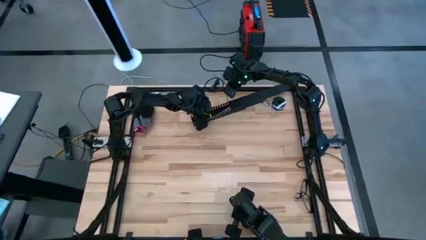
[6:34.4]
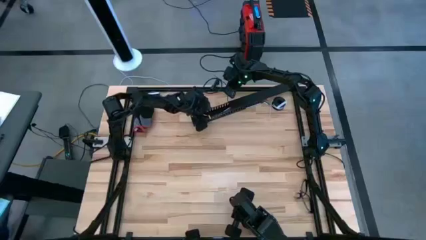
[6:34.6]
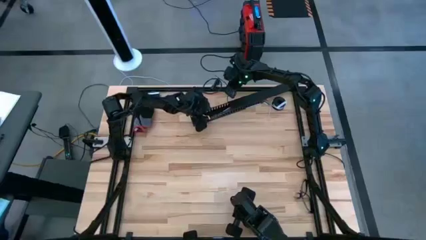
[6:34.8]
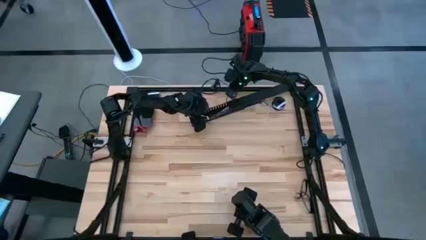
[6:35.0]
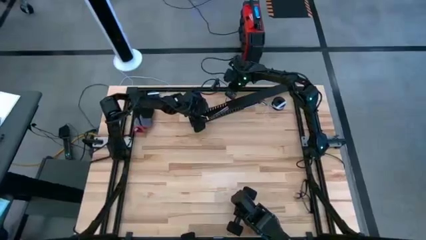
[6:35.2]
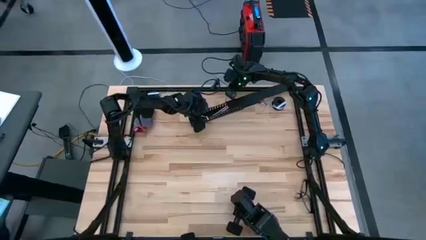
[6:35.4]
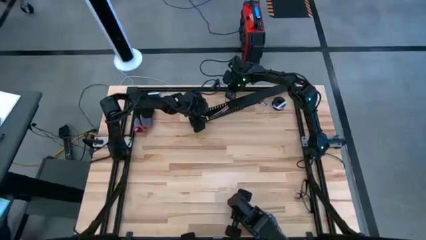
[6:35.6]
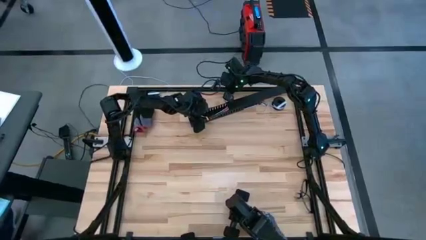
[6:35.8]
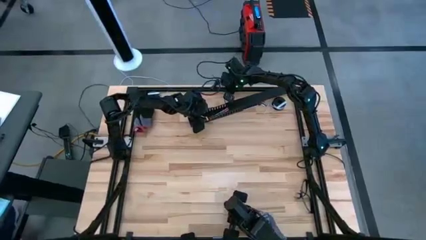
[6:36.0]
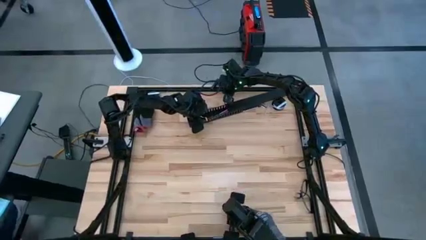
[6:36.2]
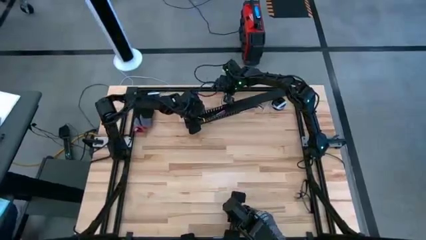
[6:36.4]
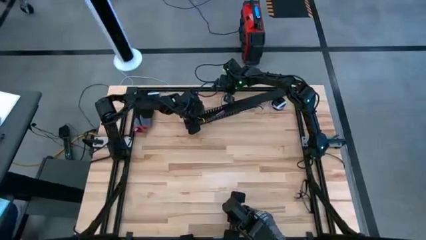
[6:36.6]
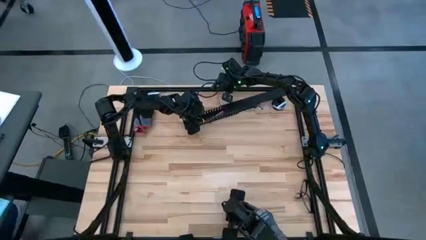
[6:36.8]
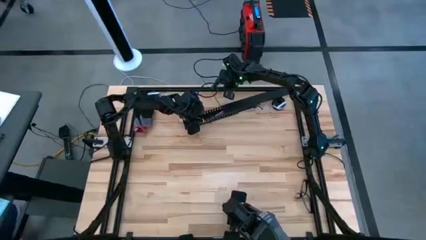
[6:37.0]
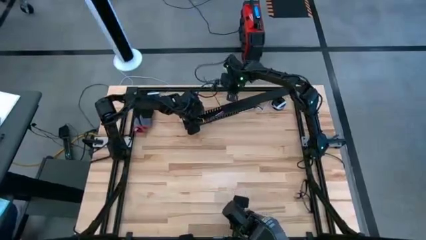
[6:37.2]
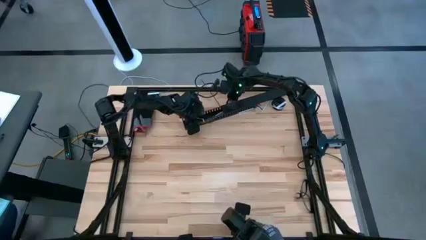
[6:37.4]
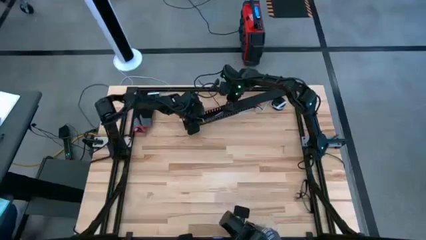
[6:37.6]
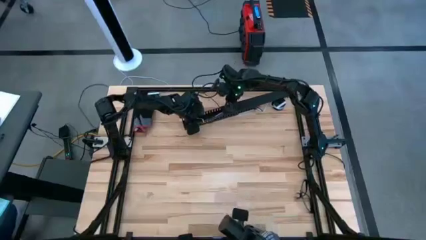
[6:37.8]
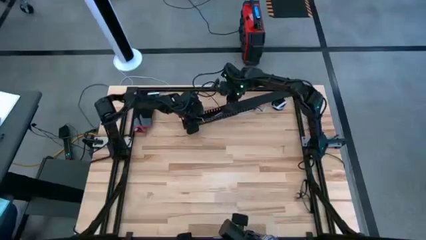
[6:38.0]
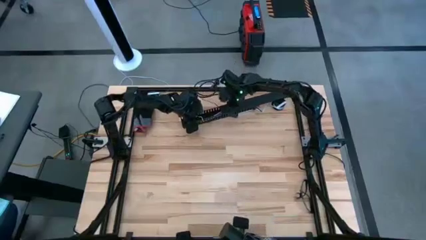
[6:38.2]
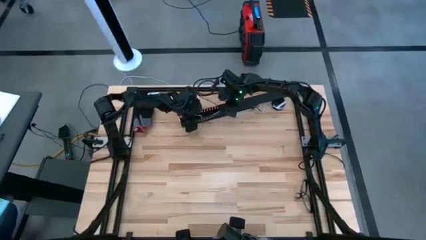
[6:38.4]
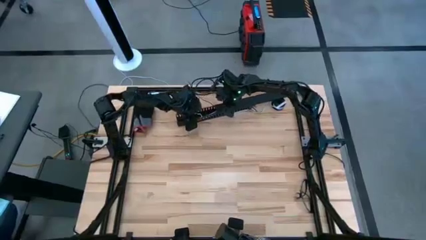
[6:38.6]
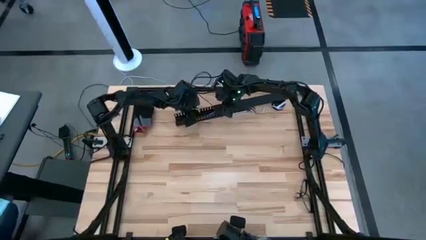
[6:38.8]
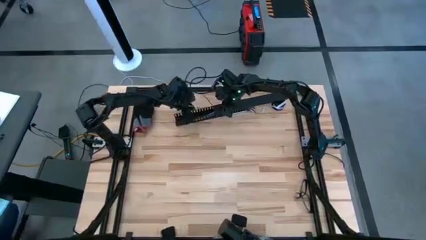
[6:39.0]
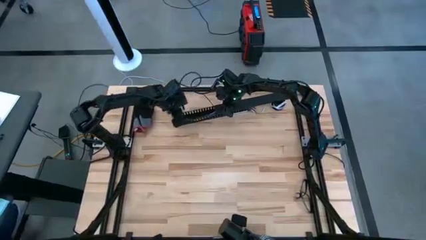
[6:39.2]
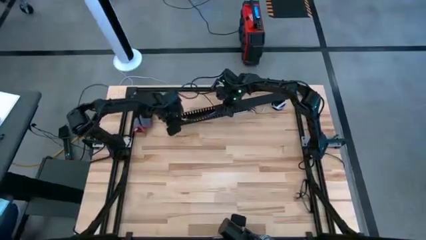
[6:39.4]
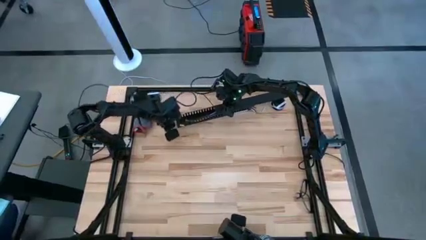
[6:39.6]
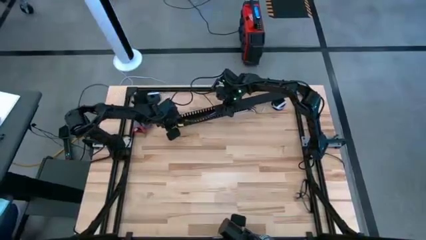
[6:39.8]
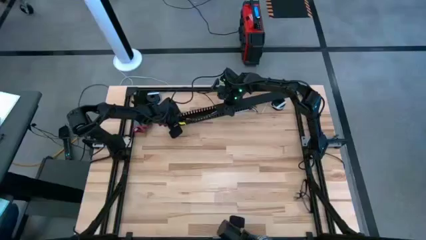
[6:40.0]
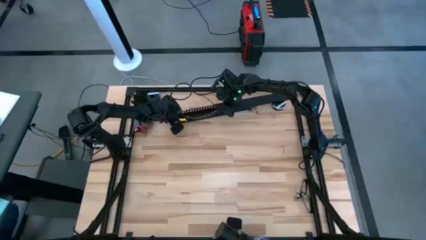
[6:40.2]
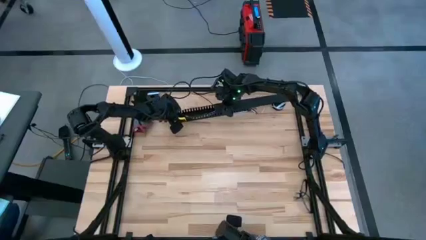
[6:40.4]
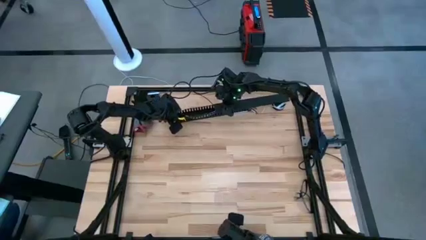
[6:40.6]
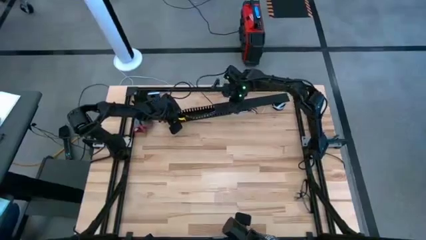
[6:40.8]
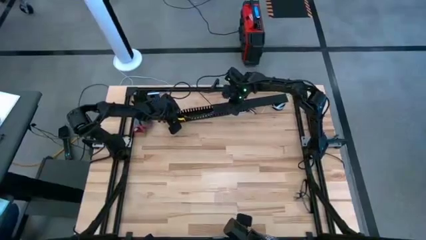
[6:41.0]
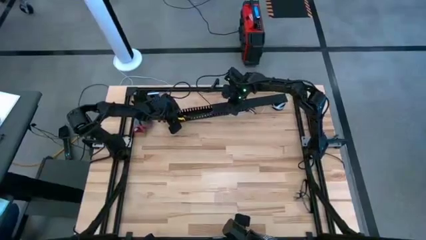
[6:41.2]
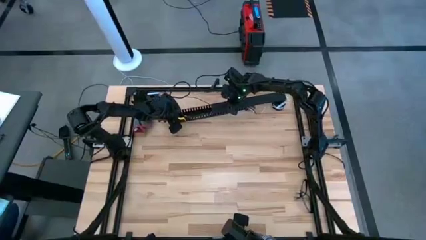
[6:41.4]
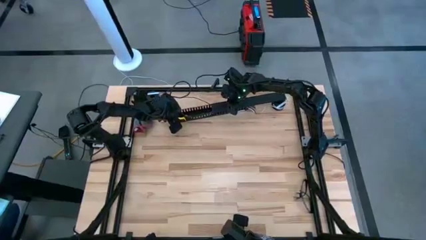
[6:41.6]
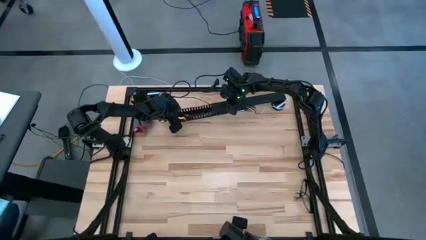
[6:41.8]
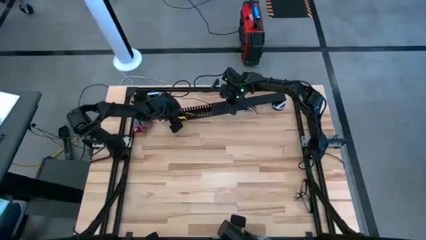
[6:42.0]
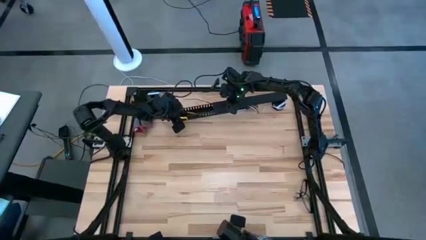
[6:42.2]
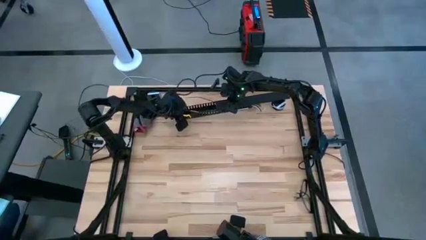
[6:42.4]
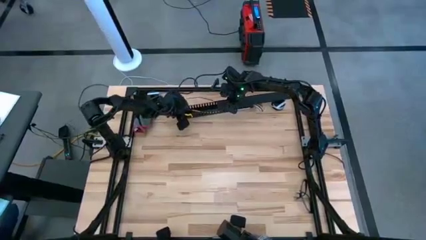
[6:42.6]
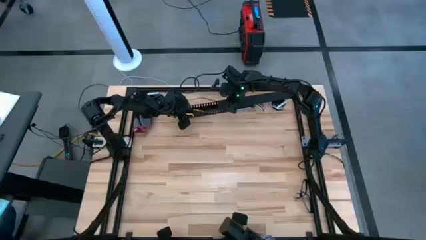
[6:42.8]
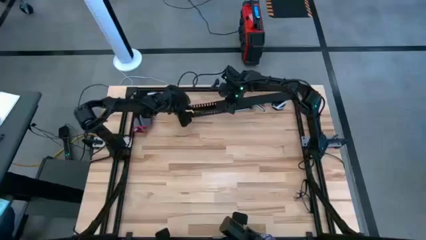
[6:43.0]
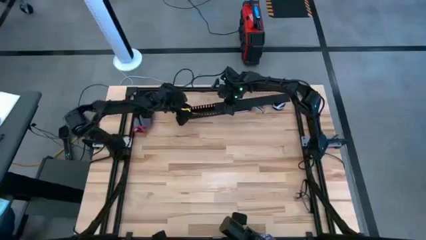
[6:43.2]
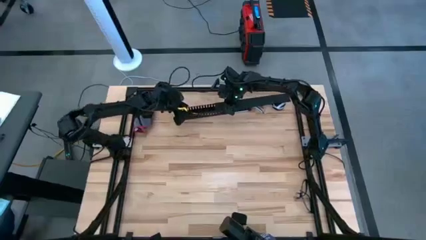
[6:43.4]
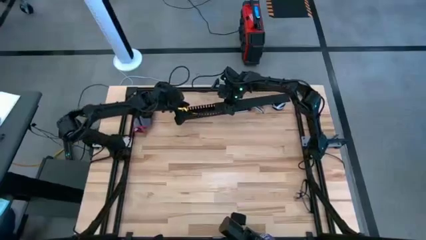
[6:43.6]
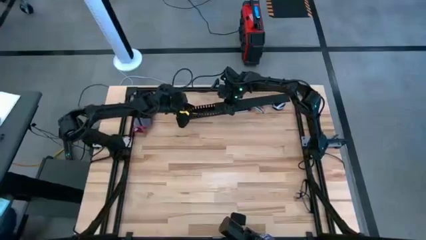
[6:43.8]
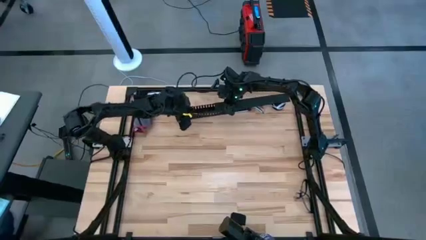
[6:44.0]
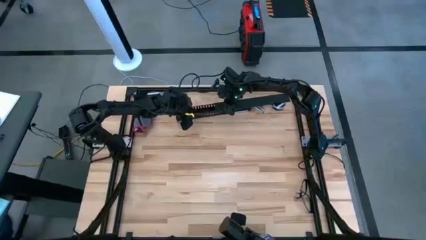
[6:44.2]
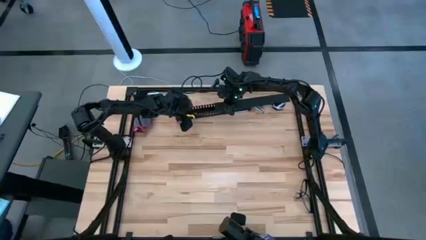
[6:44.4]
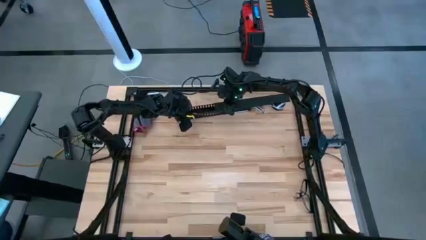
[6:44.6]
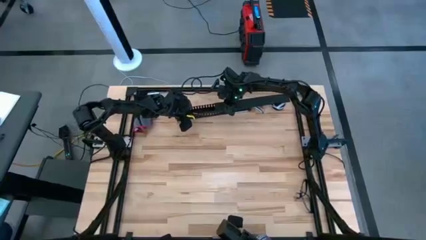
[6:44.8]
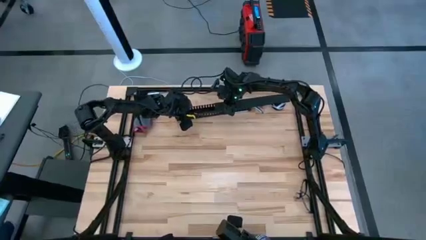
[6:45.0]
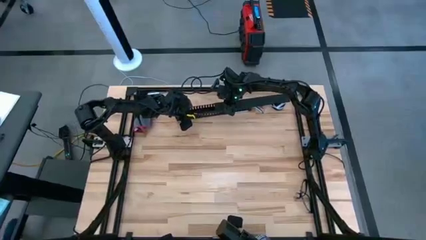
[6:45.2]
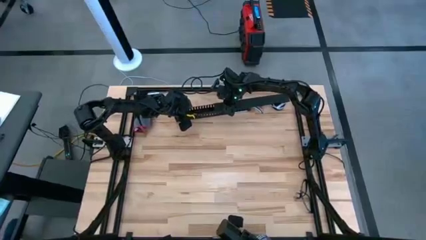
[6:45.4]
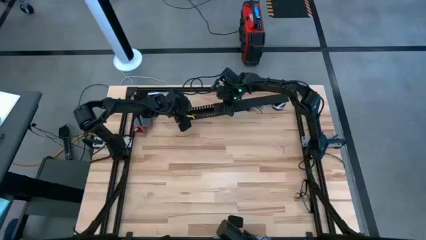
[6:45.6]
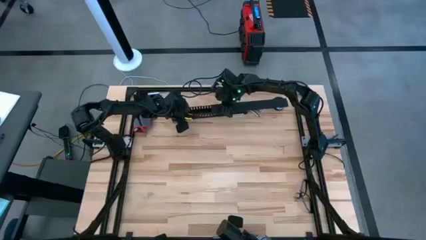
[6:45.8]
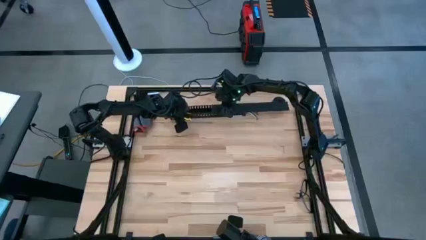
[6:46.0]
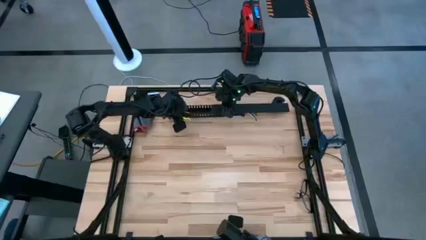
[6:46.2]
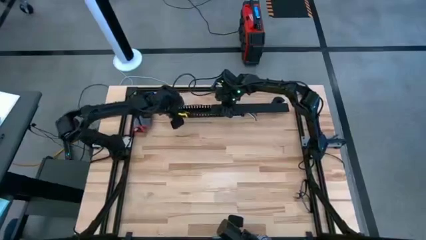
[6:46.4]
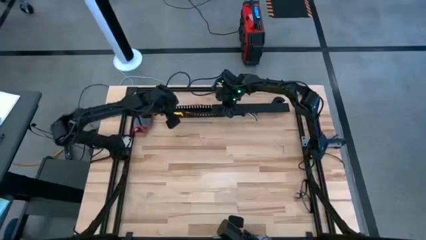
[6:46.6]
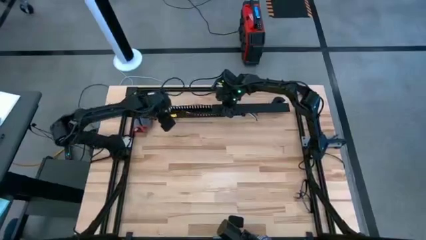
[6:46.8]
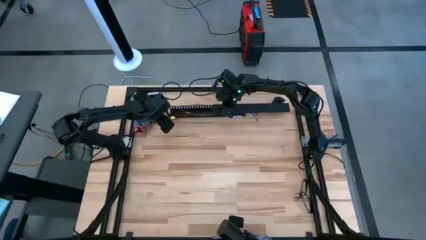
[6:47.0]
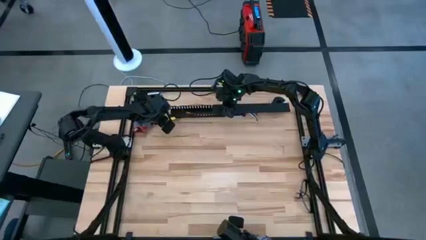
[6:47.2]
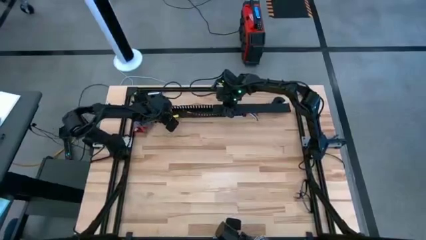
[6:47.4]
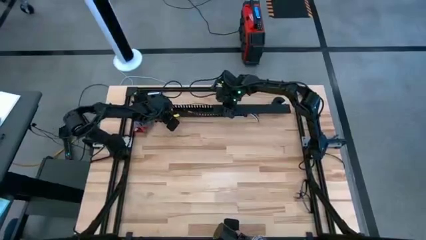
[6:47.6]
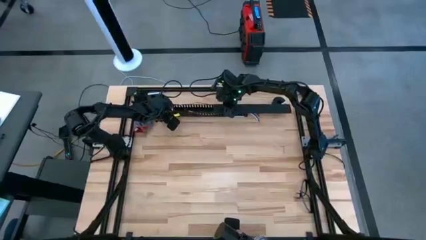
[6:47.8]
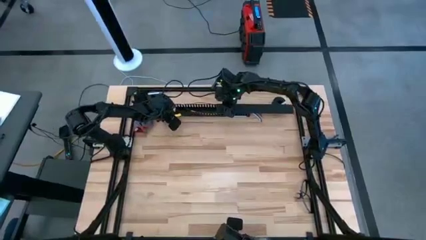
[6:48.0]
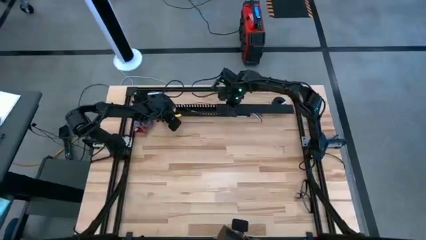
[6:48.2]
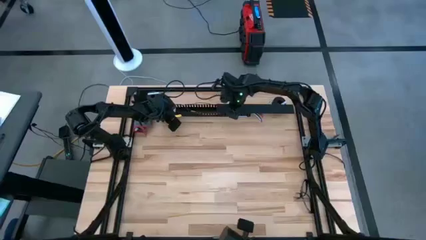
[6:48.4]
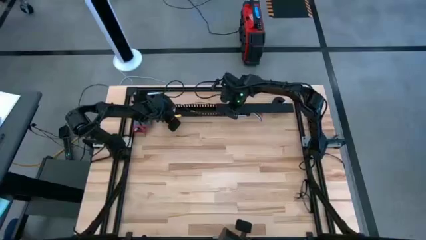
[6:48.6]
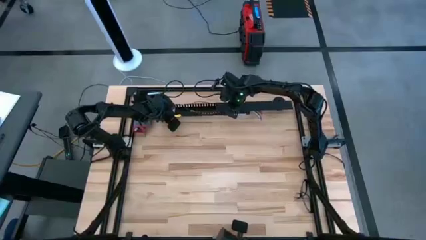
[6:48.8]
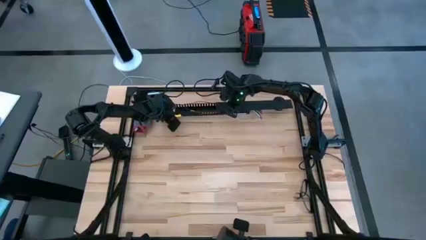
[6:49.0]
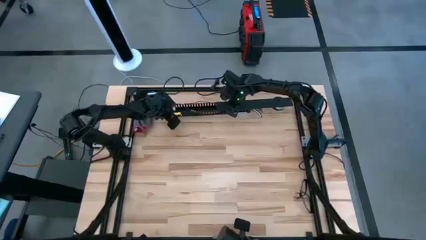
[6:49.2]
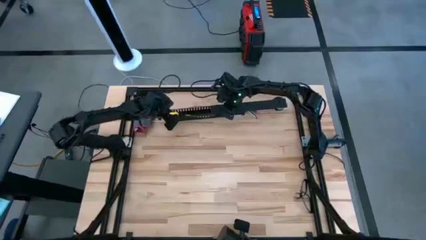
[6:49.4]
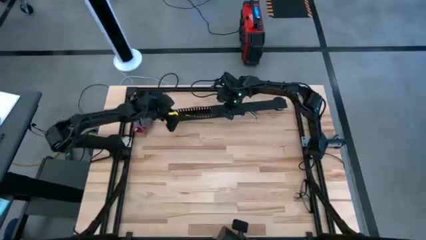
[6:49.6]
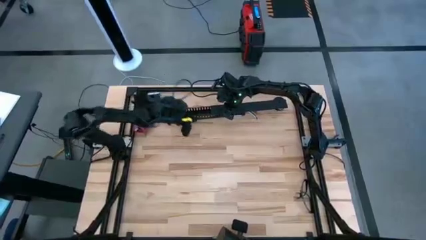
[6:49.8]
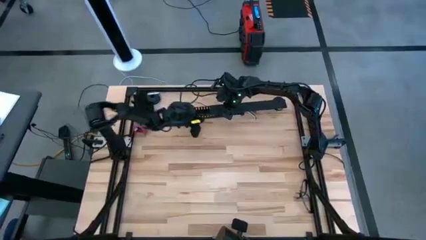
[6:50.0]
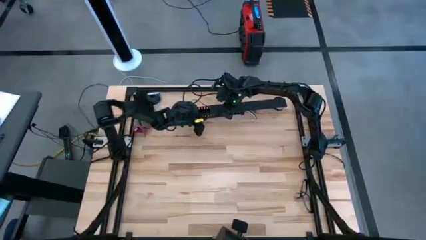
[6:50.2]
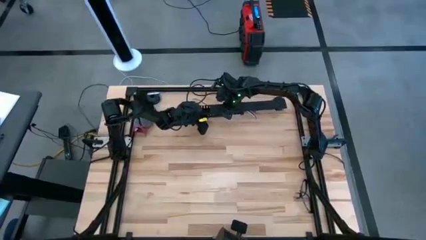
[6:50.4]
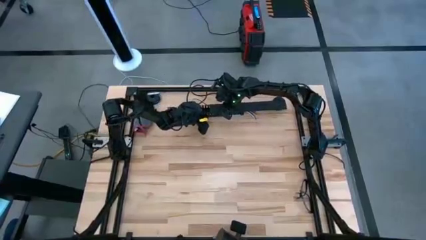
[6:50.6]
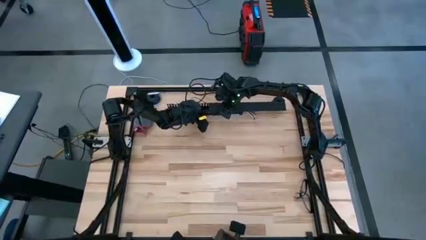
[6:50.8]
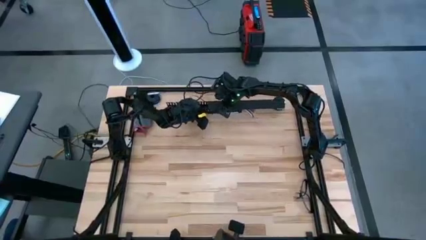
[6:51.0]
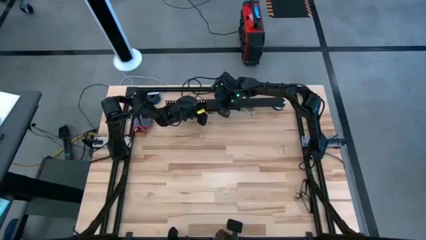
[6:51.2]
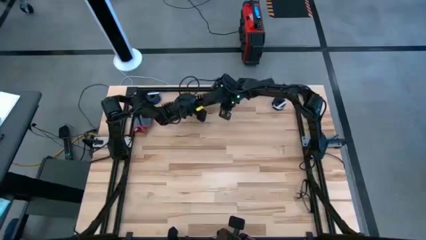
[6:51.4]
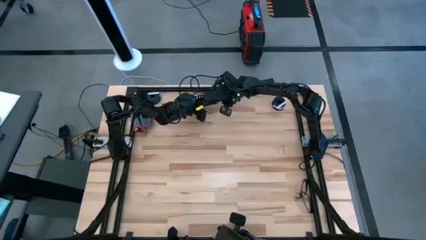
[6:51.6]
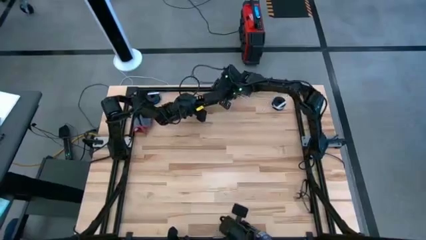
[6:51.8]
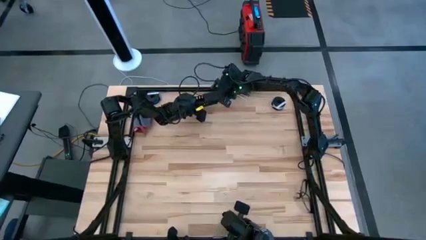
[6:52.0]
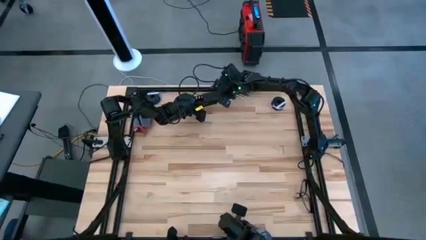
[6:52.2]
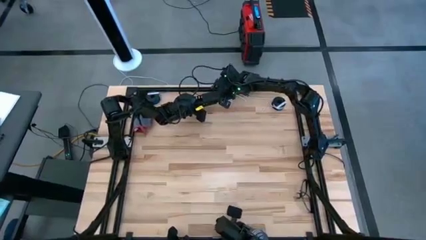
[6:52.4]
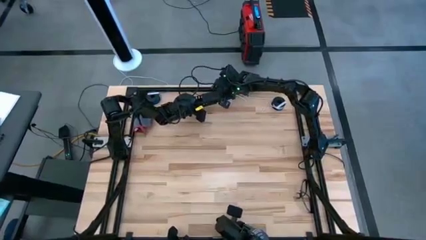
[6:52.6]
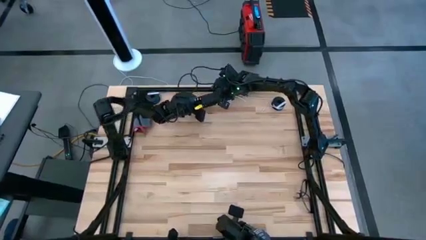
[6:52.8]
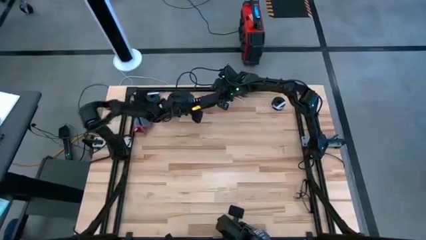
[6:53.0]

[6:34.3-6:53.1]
Task: Ziptie cables
Close the black cable duct
